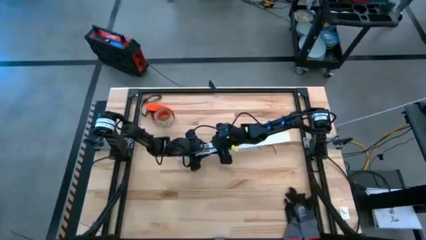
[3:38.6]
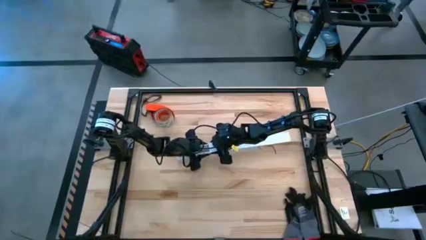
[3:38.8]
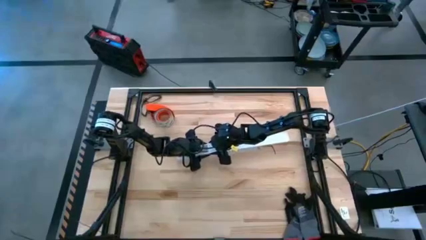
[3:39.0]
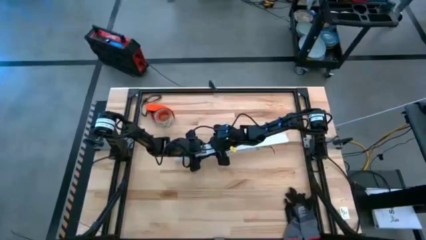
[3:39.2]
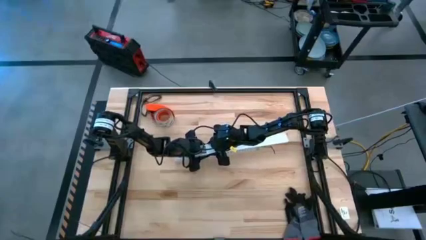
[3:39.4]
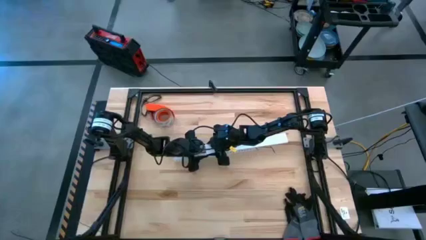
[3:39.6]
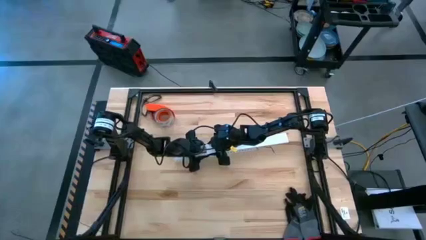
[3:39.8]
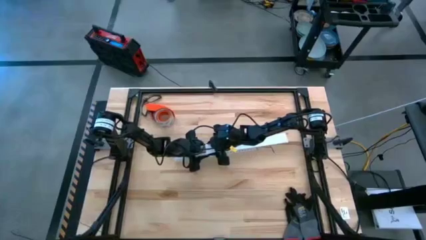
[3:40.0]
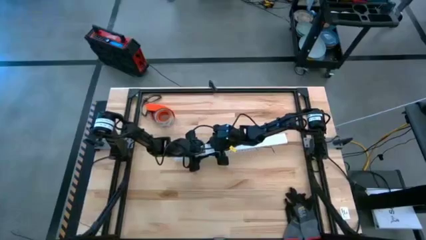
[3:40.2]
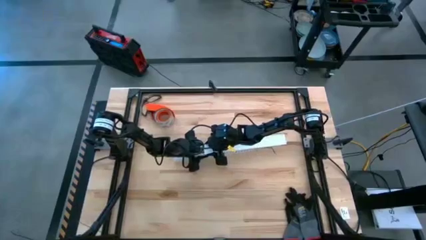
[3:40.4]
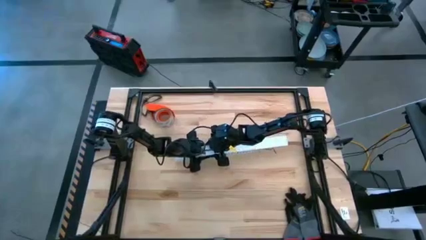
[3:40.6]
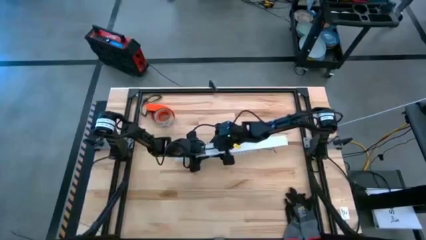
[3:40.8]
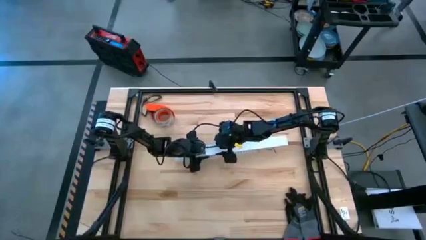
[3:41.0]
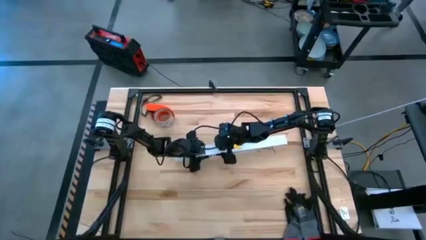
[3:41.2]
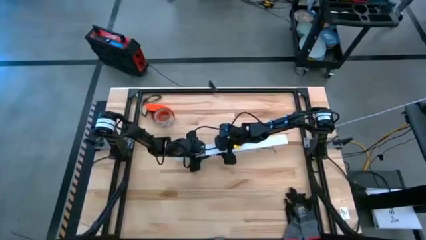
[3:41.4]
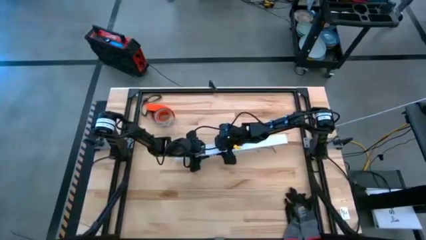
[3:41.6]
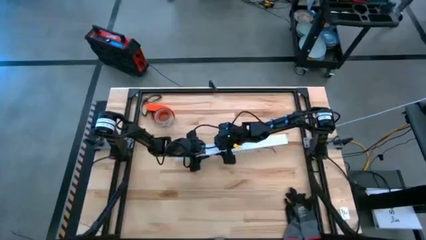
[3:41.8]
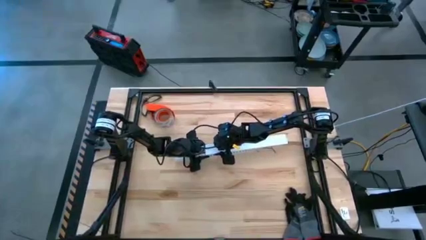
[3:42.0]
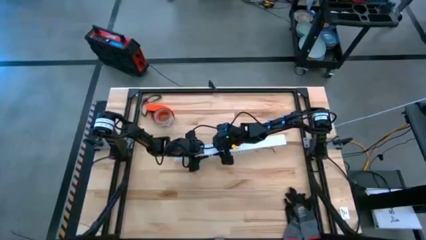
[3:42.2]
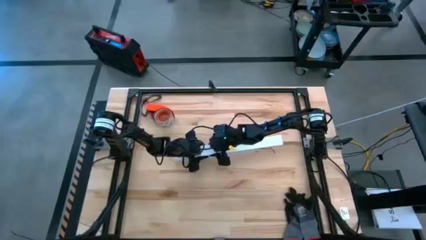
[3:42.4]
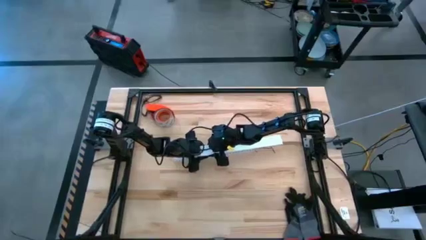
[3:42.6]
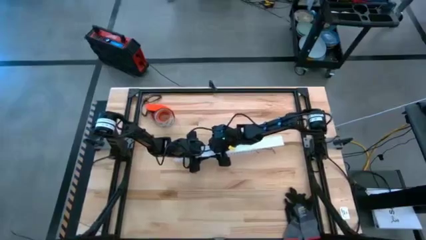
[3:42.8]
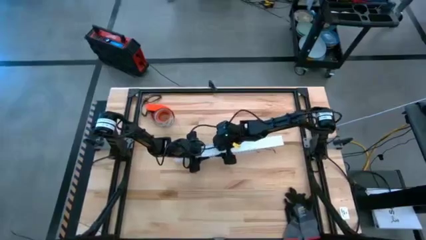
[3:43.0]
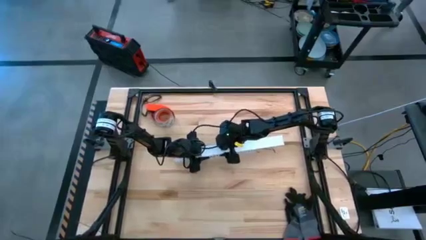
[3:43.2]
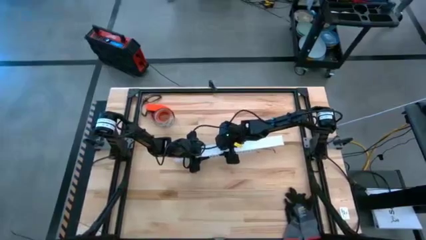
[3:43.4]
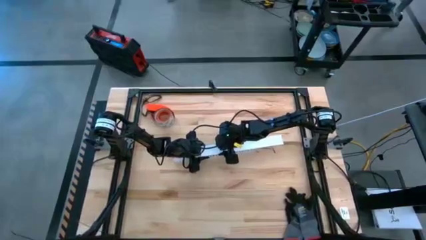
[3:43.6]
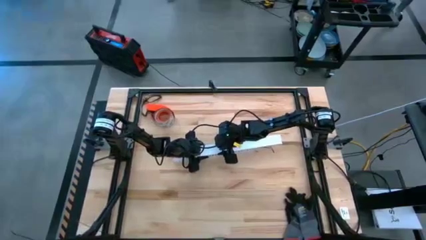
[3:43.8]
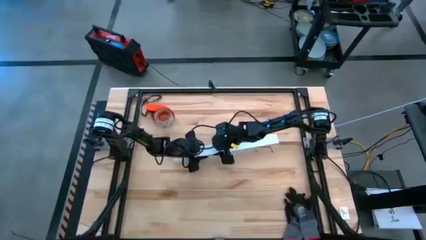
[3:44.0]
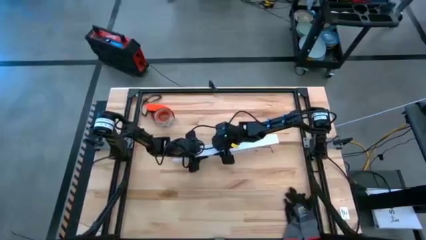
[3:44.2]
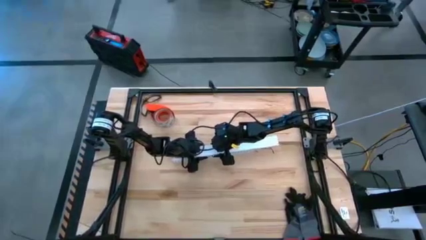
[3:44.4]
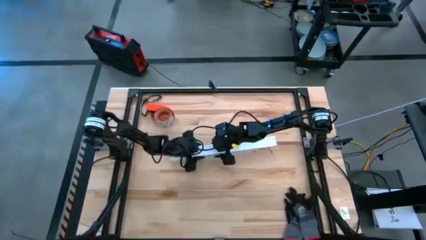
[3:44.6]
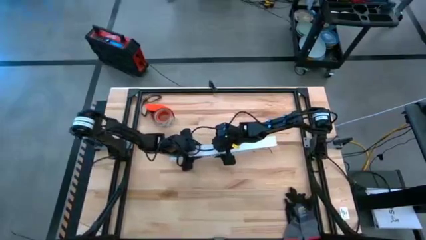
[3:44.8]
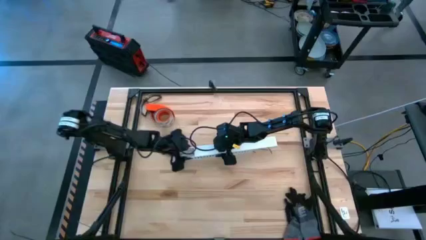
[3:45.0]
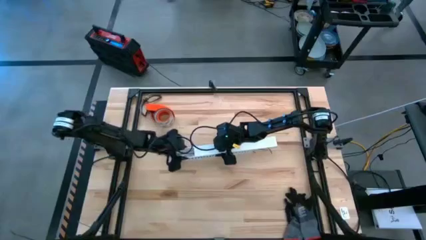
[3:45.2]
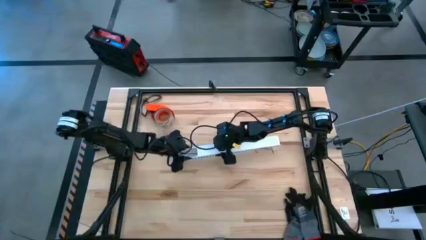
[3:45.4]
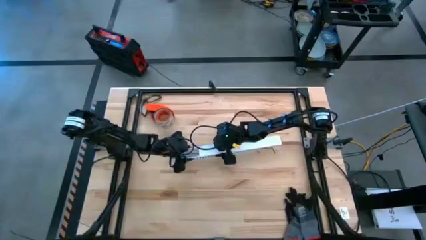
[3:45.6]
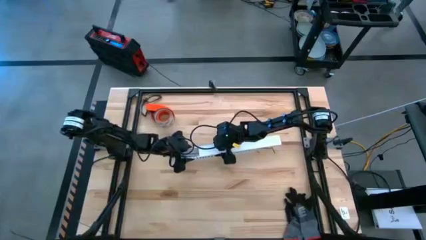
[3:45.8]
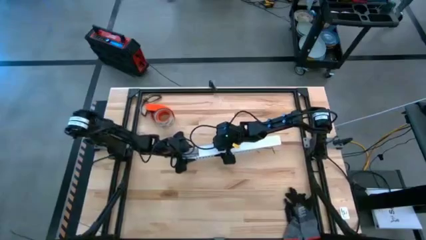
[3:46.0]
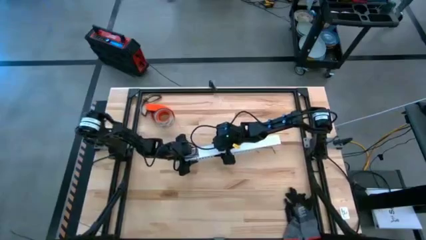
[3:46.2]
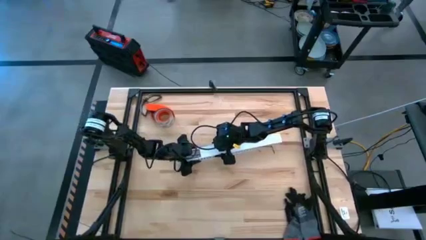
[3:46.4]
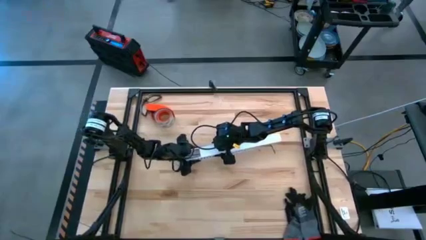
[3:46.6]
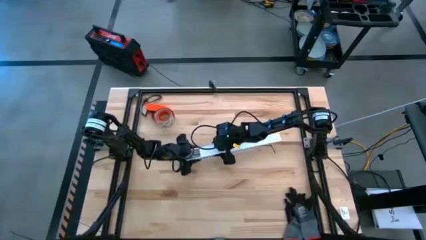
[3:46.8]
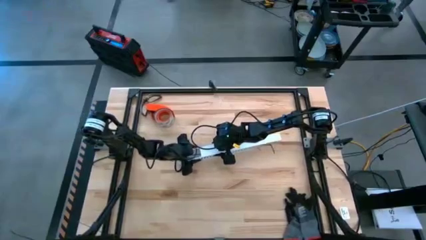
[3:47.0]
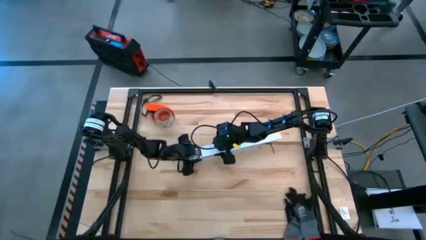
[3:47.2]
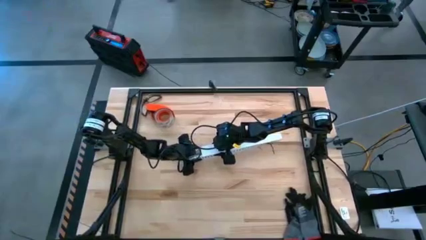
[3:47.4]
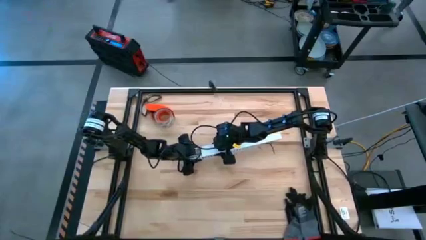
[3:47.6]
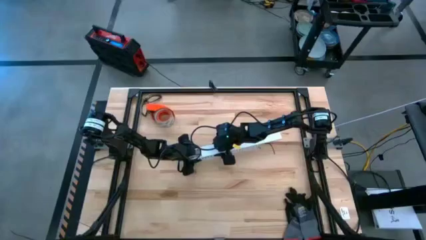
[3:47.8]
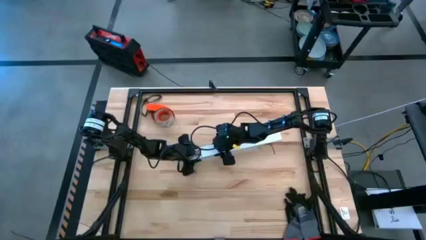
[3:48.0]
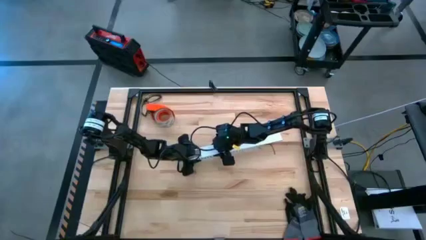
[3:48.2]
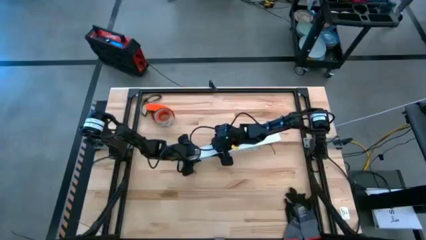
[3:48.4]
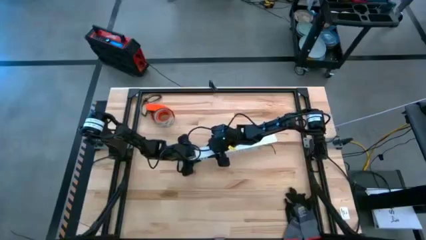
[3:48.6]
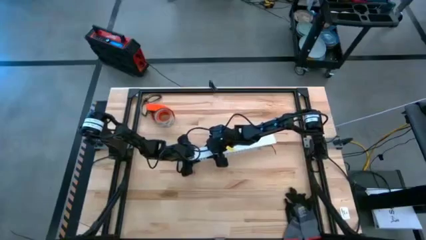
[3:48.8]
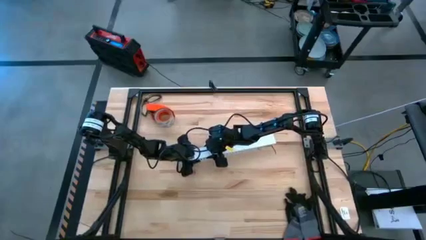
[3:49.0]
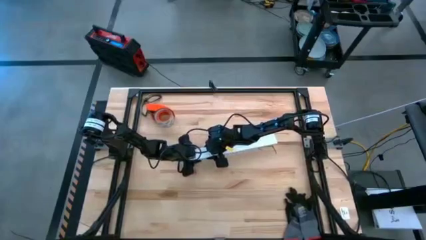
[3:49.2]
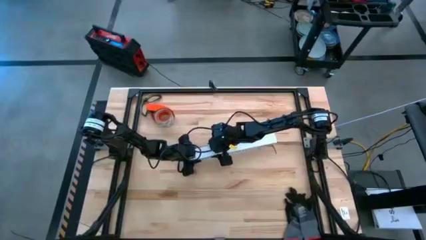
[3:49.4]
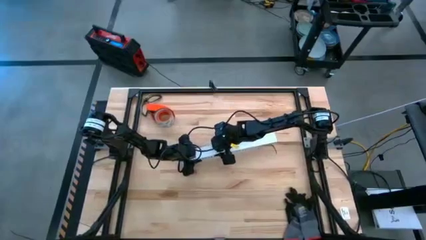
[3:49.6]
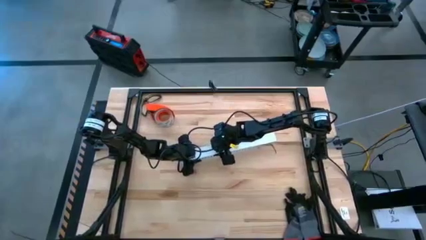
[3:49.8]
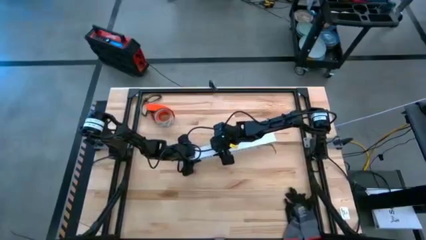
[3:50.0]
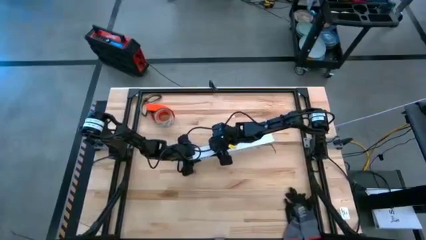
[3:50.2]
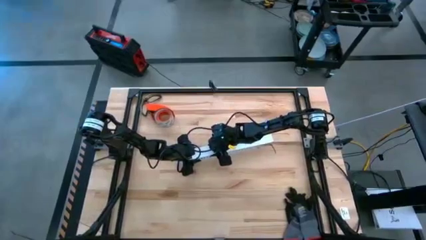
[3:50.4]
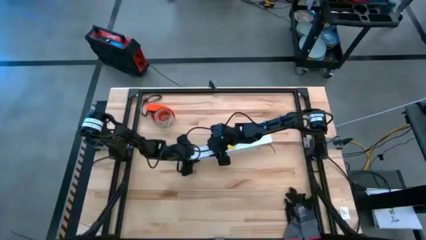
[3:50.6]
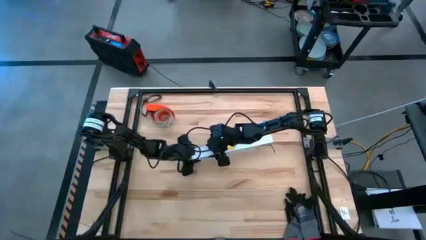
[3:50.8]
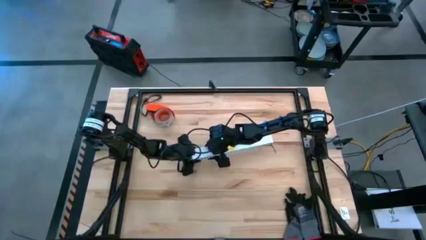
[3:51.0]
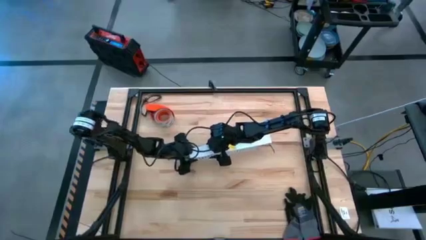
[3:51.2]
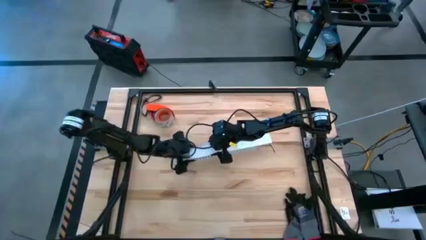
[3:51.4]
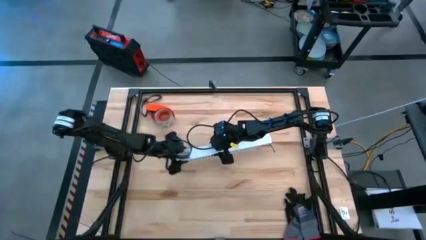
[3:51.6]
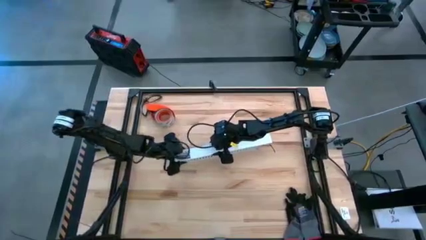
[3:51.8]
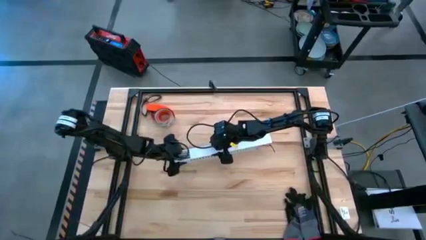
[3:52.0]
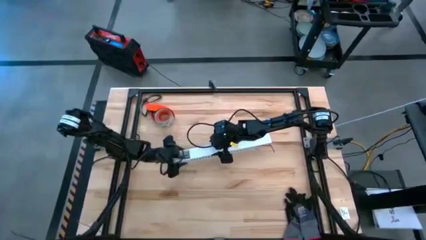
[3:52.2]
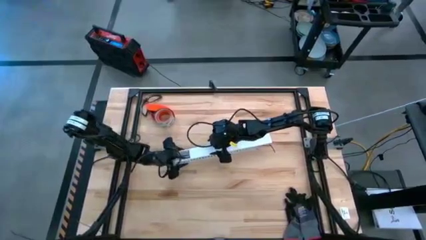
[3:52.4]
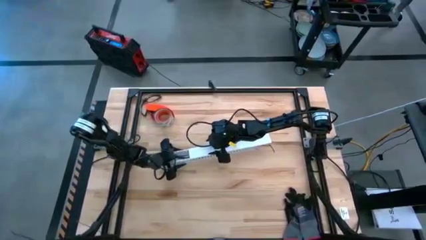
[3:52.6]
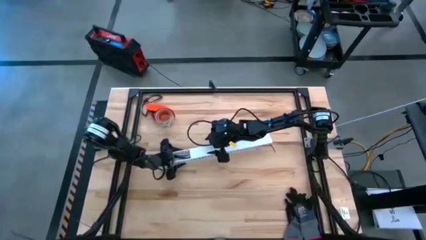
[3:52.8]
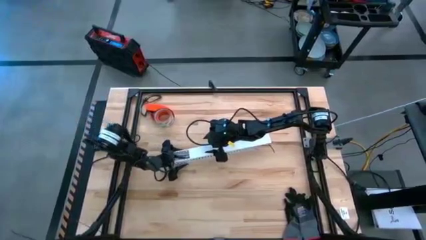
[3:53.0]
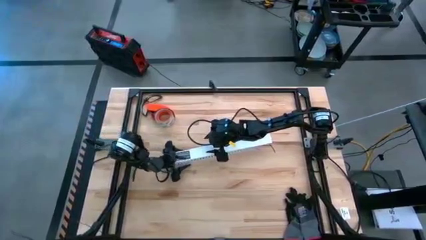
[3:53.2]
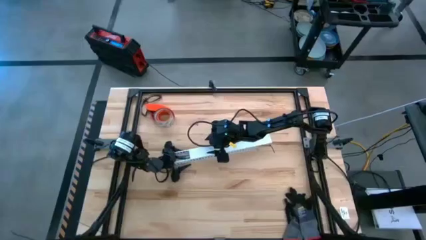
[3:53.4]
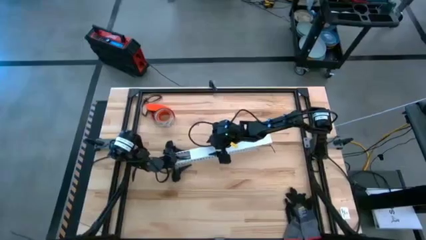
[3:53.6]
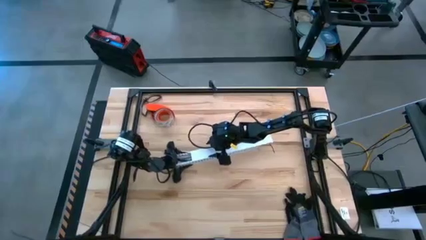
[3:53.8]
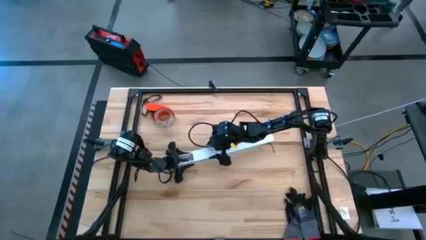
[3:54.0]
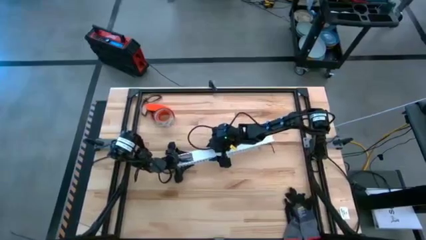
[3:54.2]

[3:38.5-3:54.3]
Task: Ziptie cables
Close the white cable duct
